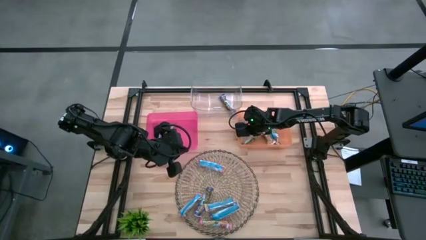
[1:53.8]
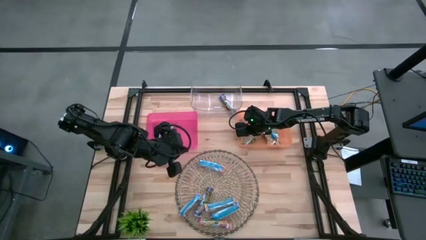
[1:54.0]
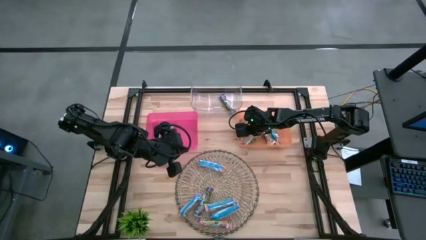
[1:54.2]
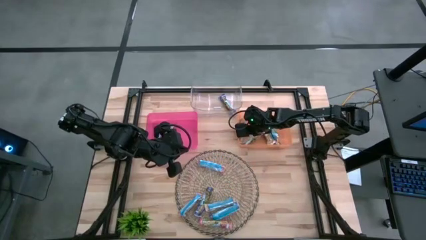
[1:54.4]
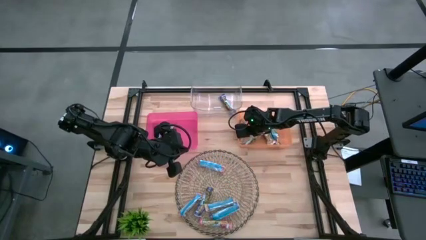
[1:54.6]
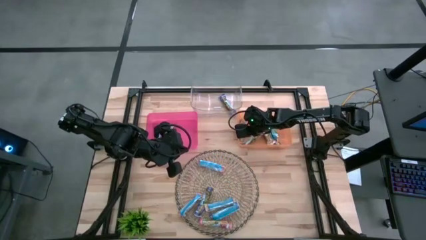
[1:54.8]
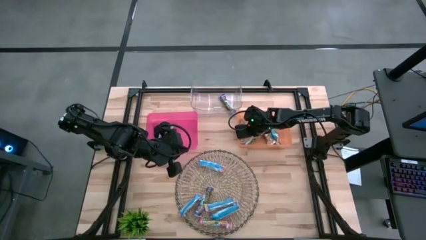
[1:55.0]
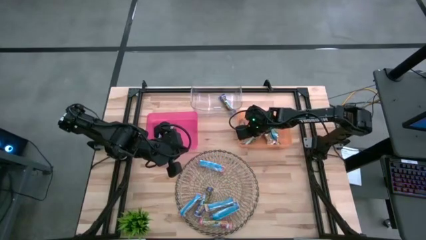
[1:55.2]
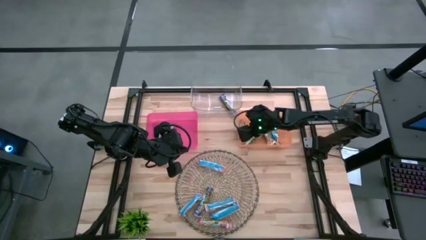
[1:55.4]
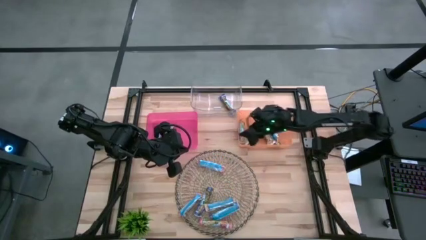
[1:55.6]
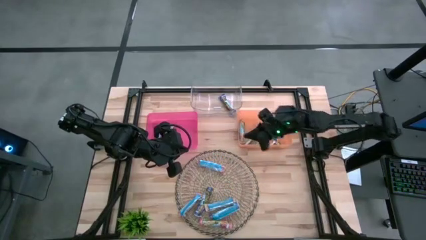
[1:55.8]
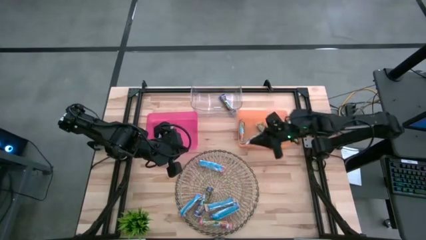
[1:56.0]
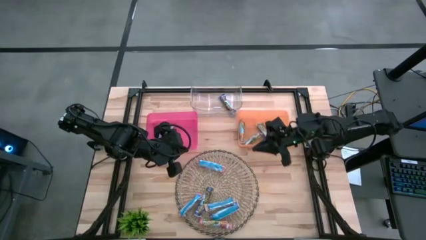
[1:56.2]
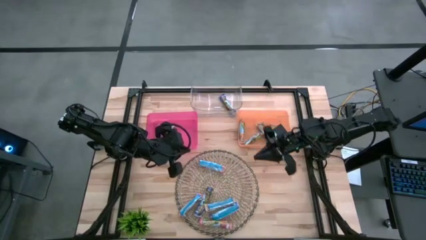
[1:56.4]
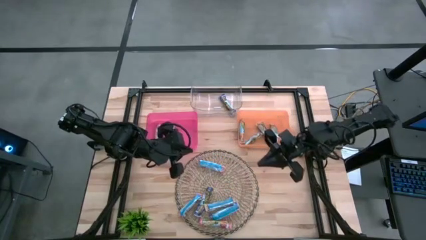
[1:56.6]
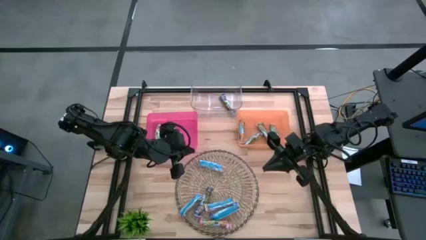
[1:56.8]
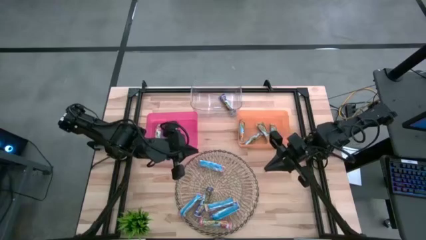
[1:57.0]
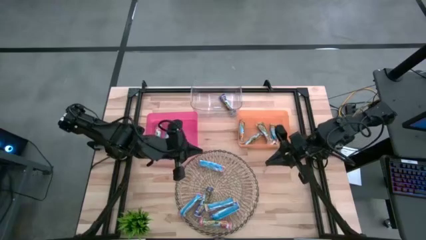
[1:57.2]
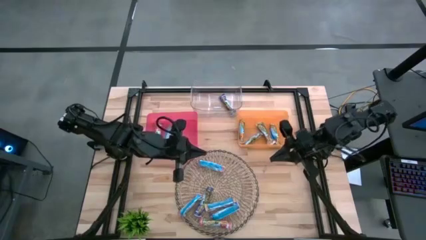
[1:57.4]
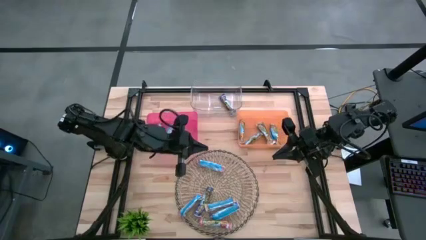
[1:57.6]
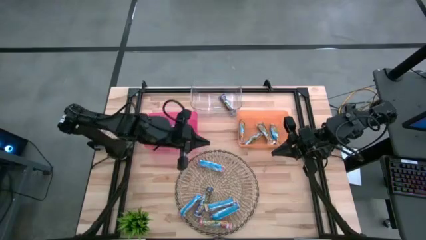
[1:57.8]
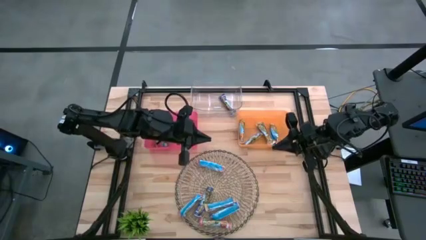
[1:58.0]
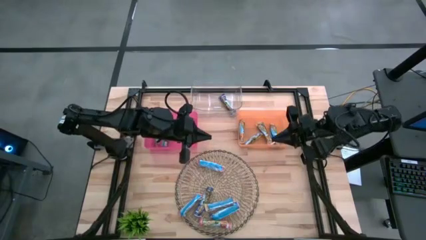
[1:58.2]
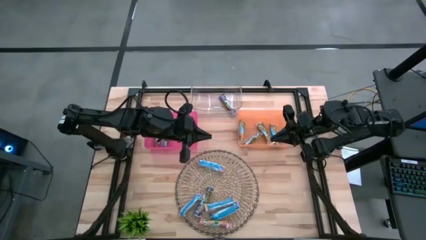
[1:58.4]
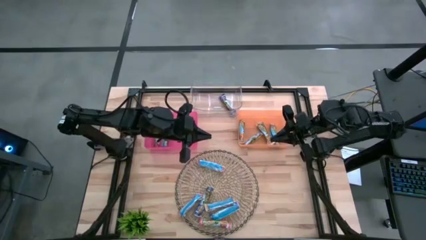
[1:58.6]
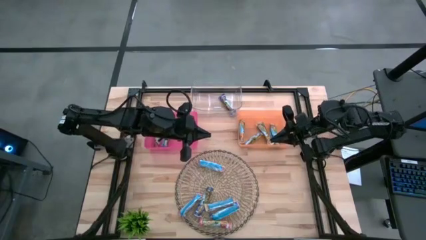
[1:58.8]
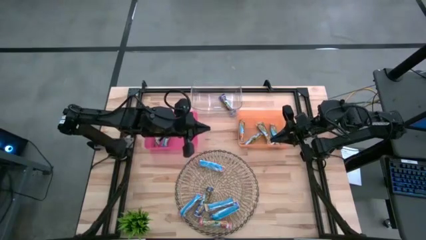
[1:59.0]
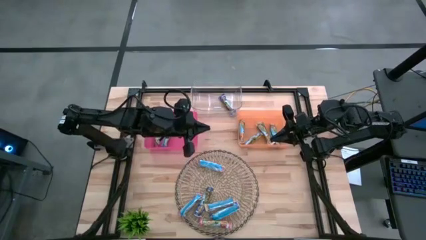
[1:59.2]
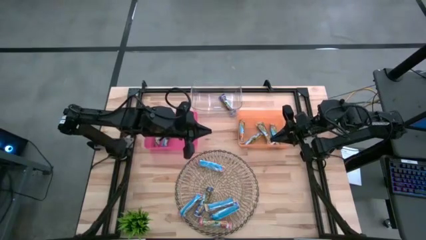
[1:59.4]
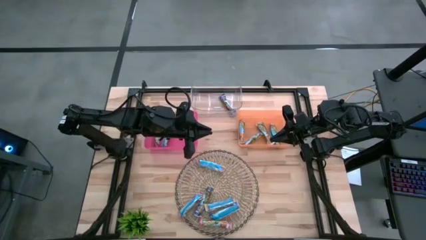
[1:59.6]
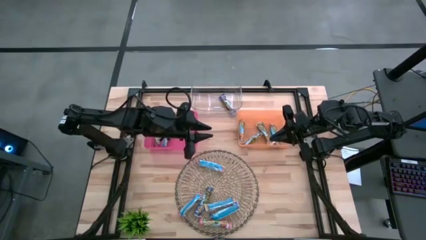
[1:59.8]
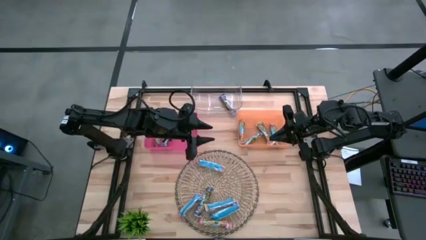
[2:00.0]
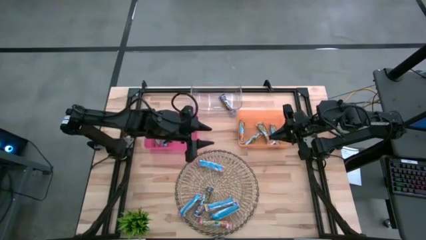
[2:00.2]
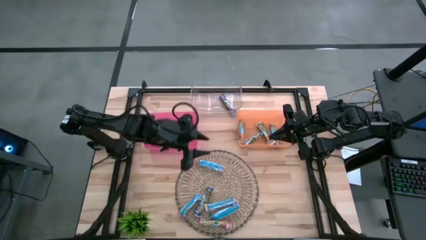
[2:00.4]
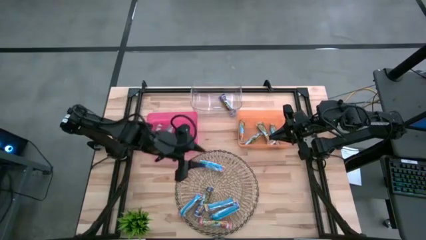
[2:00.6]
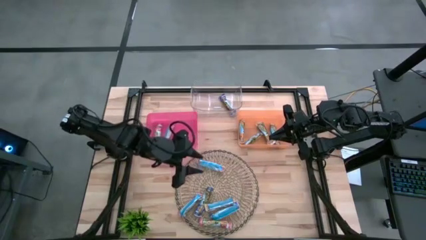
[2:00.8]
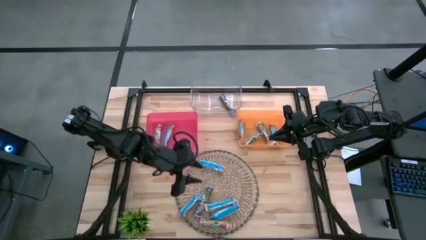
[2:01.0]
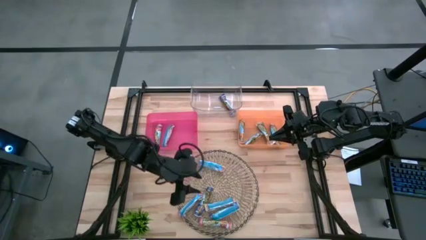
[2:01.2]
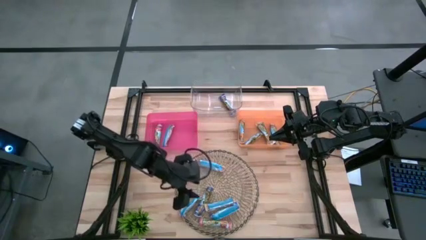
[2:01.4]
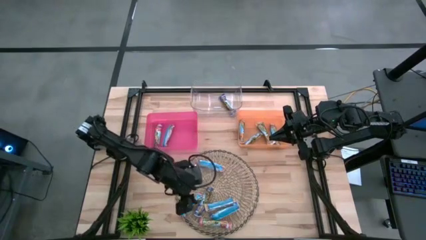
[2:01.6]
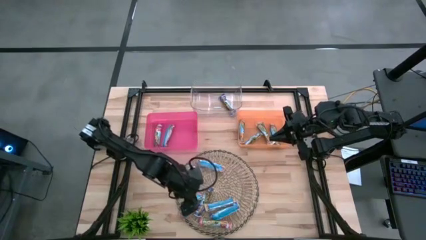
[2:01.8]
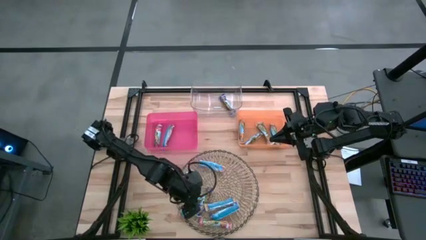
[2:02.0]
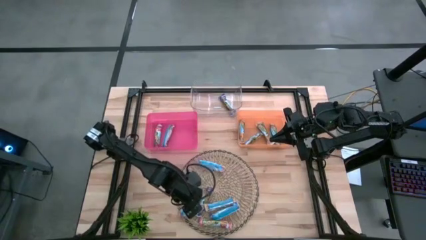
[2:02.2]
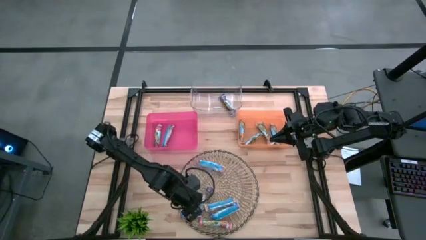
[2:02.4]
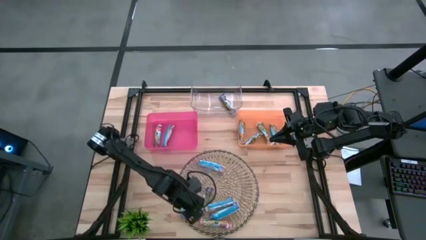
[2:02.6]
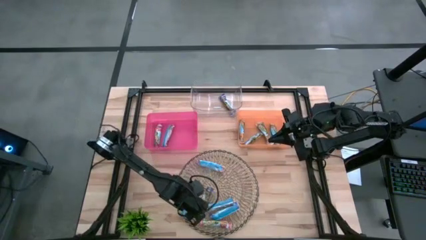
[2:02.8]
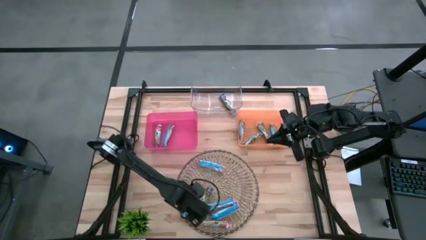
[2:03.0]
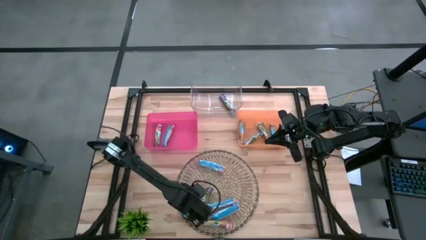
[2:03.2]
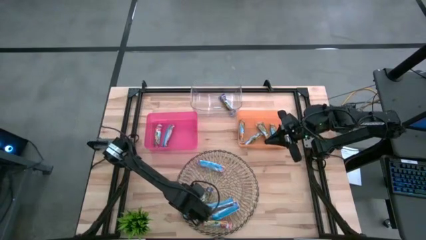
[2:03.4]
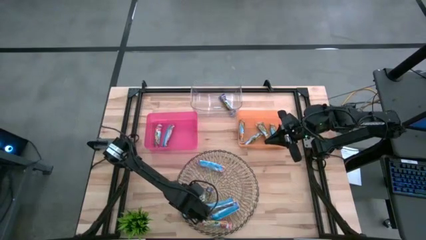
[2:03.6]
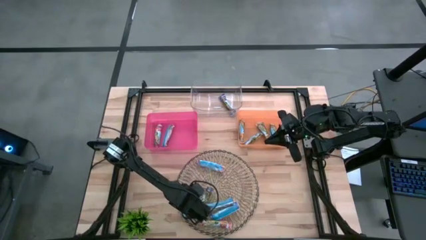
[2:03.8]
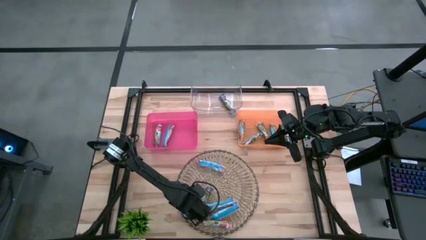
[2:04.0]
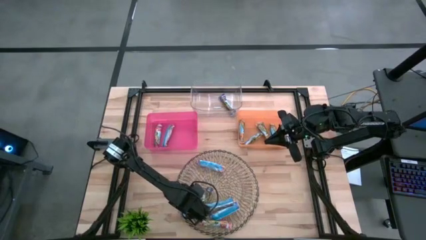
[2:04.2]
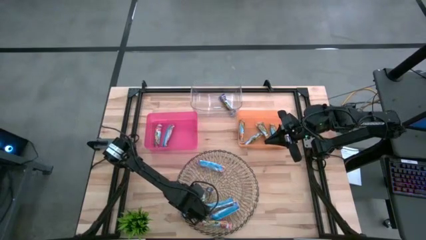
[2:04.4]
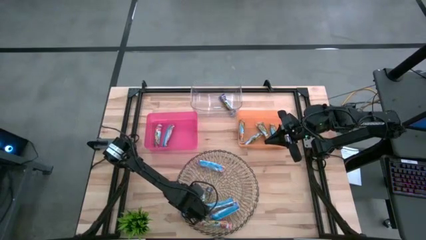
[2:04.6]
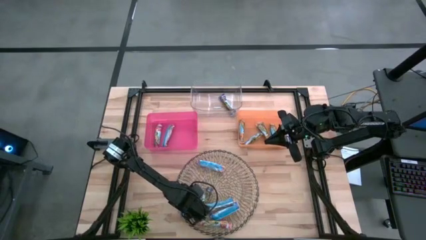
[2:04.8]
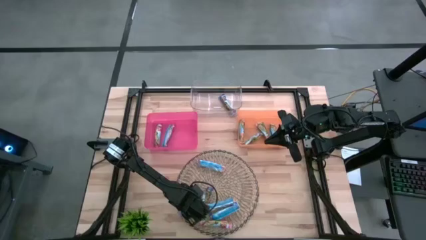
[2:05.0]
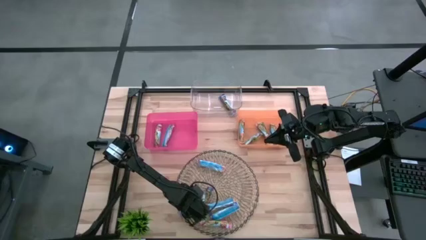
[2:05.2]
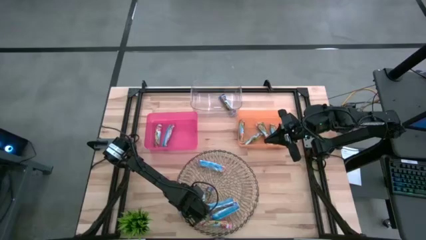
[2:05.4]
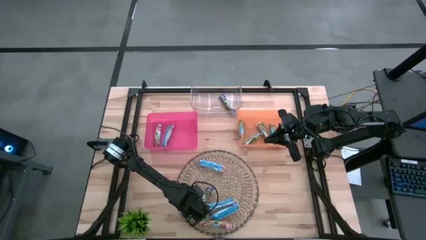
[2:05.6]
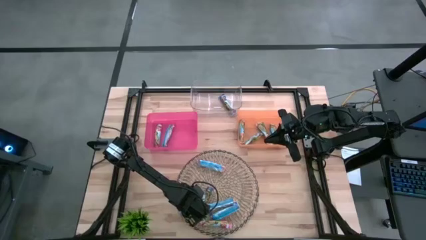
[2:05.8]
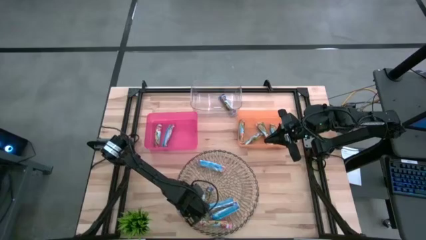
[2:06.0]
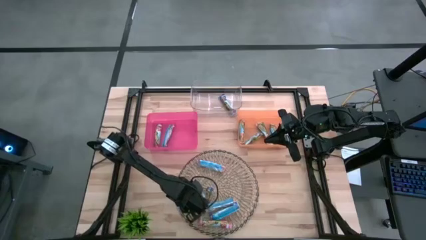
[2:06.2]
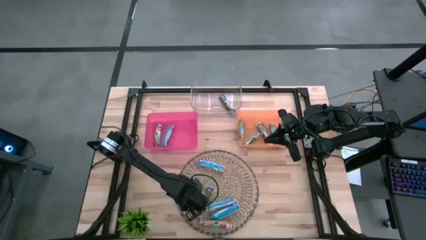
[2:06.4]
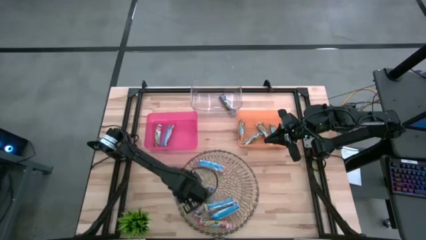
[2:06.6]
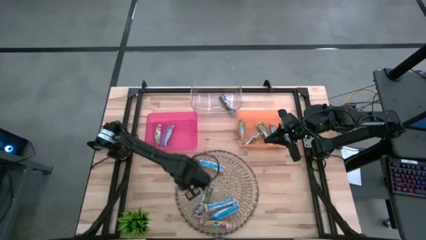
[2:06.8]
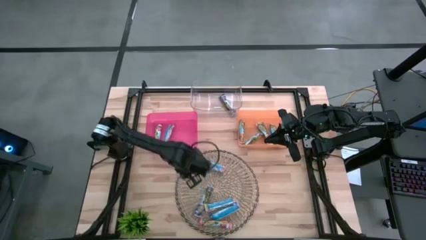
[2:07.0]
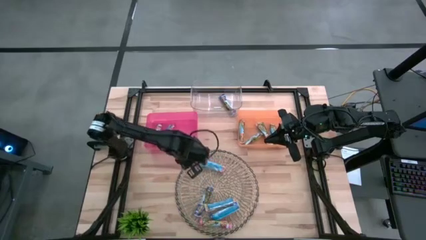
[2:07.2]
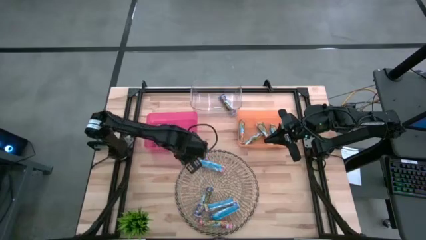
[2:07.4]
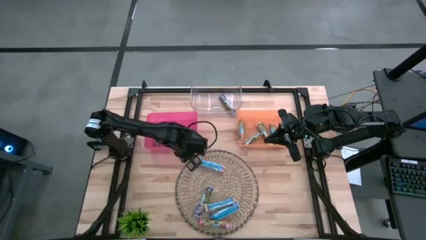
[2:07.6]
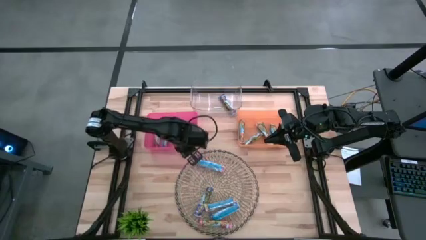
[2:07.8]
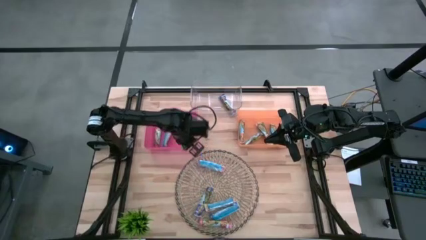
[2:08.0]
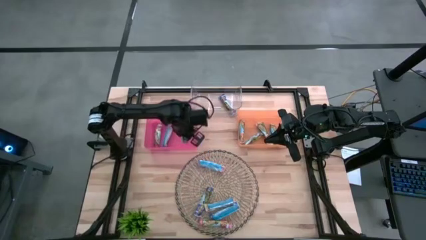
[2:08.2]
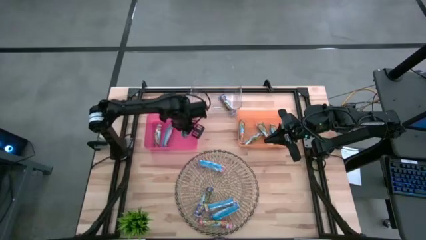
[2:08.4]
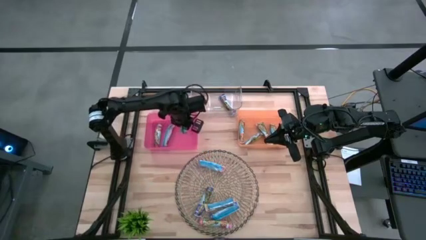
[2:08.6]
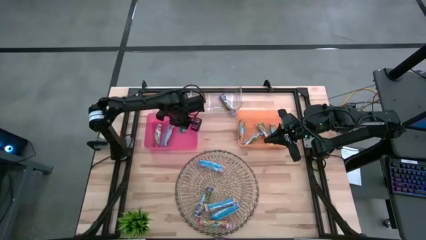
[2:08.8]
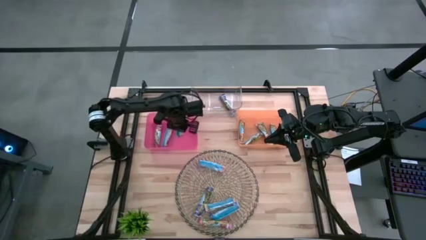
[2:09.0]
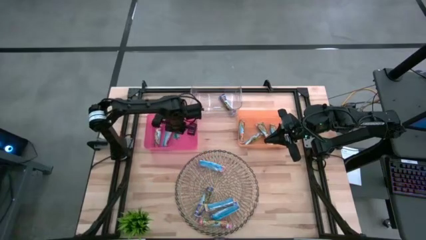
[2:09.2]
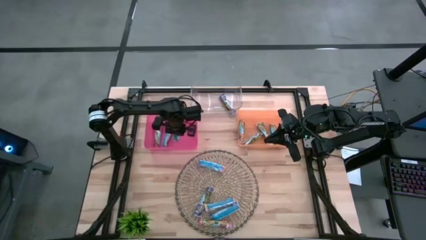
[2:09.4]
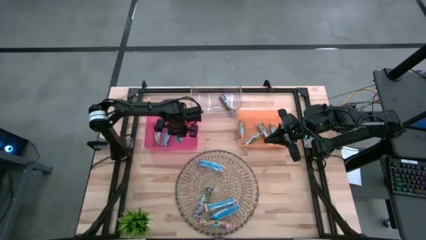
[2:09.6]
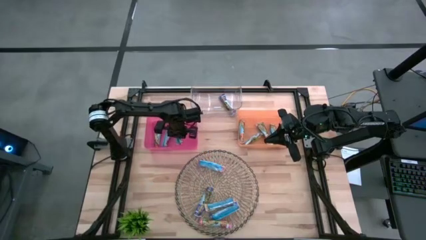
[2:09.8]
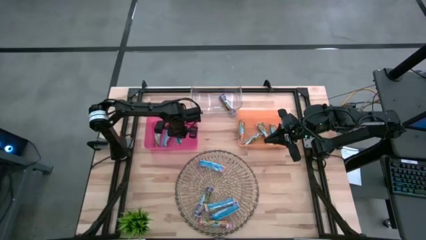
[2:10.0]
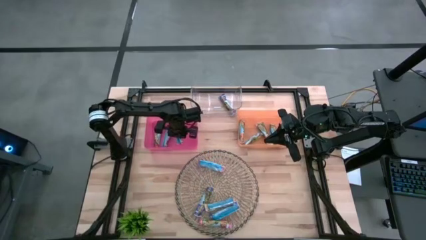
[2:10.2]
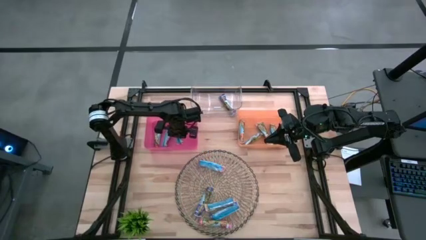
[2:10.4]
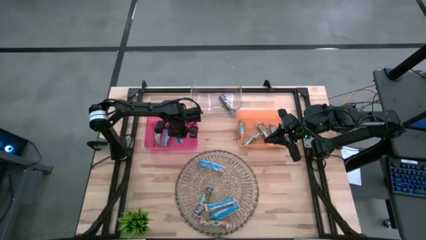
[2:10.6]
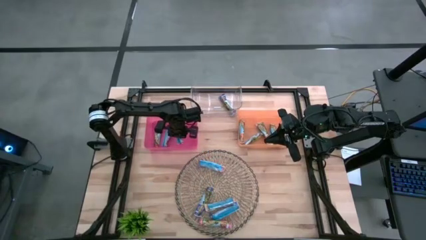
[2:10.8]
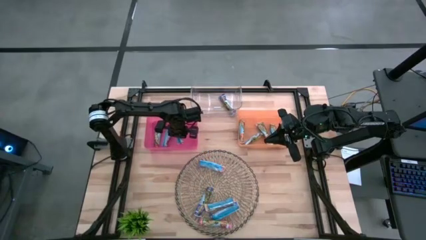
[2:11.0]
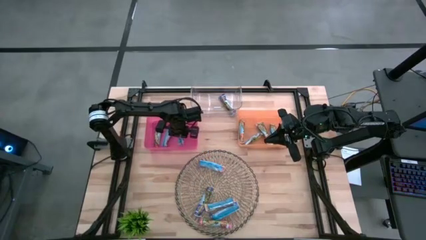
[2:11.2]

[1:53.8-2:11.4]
Task: Pick and place Granola Bars by type
Put the red granola bar into the pink bin
